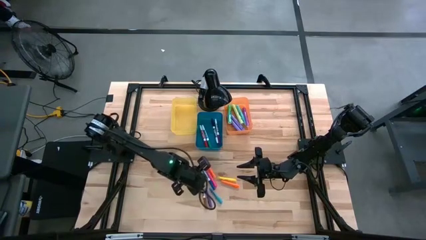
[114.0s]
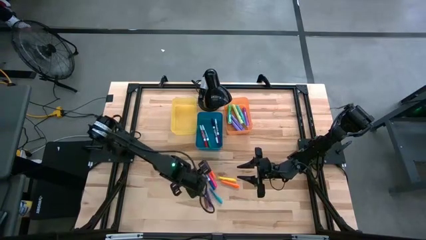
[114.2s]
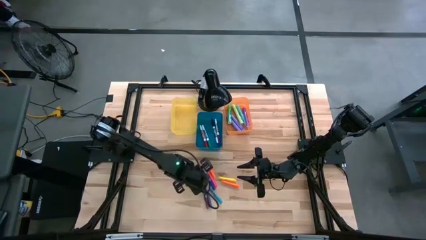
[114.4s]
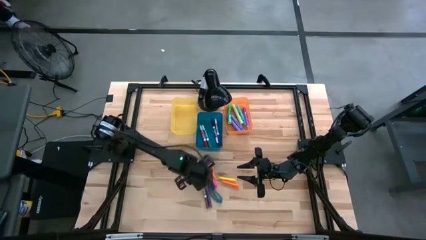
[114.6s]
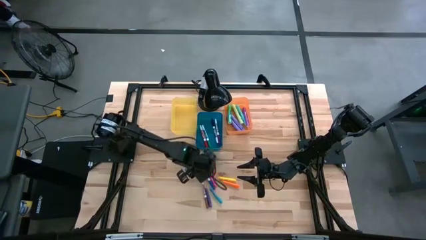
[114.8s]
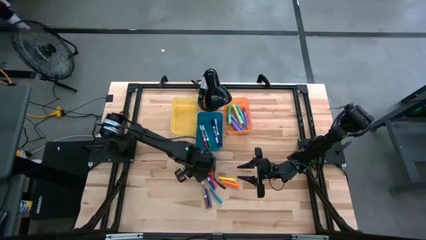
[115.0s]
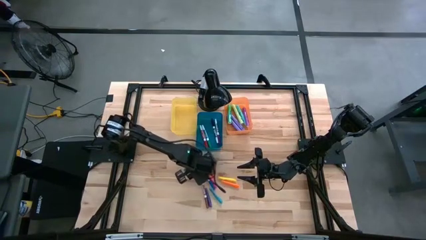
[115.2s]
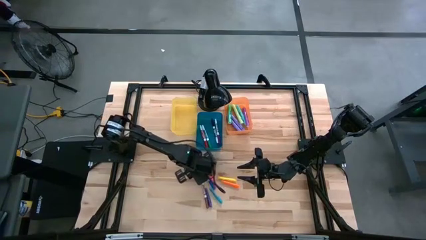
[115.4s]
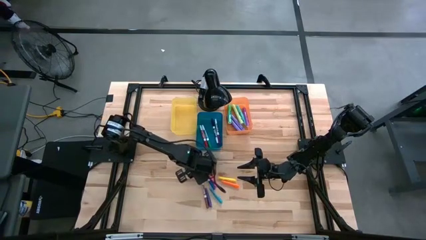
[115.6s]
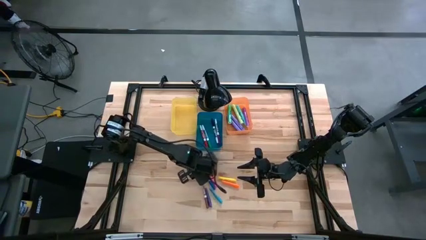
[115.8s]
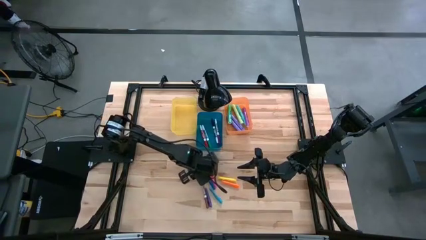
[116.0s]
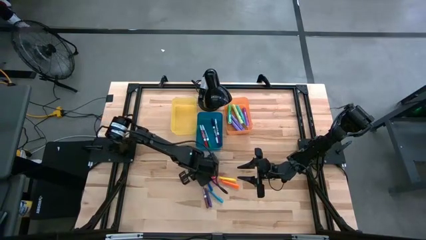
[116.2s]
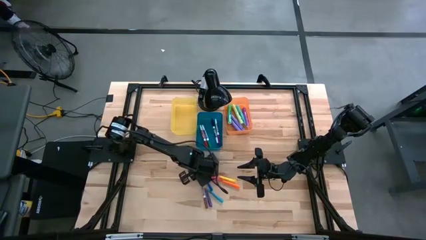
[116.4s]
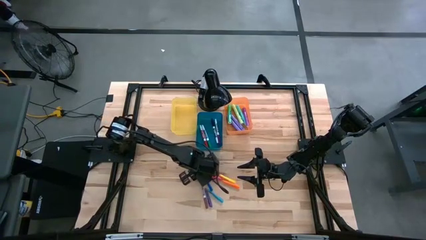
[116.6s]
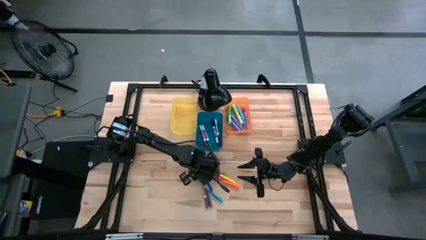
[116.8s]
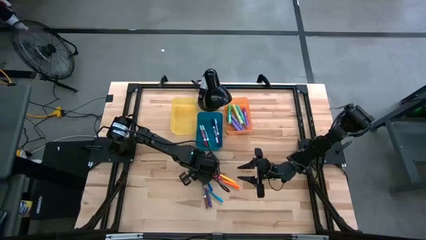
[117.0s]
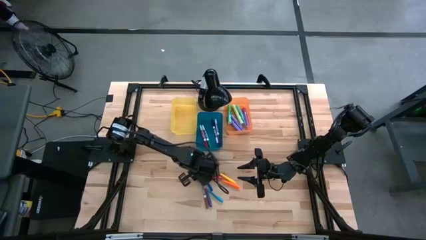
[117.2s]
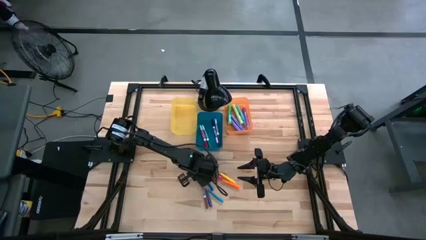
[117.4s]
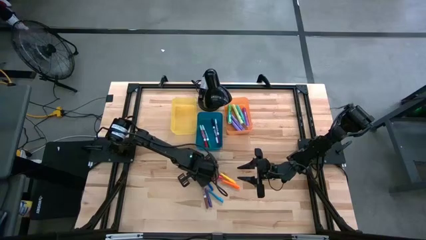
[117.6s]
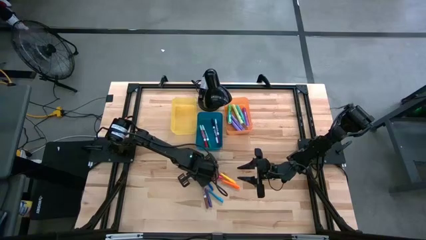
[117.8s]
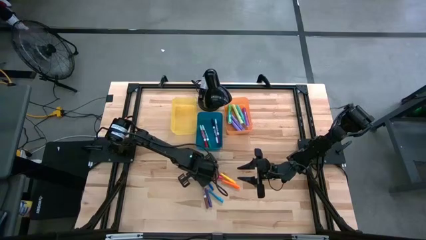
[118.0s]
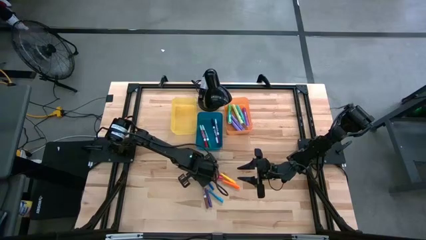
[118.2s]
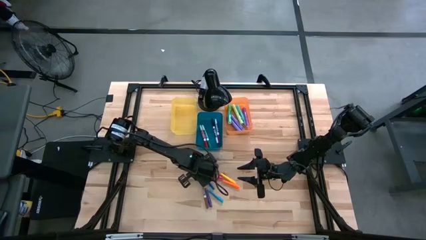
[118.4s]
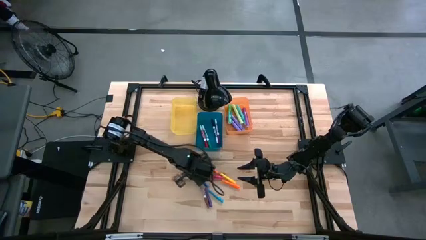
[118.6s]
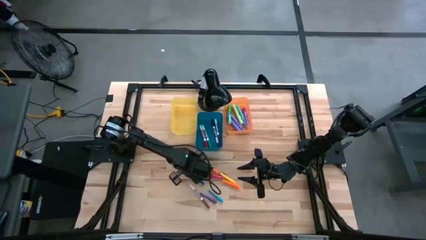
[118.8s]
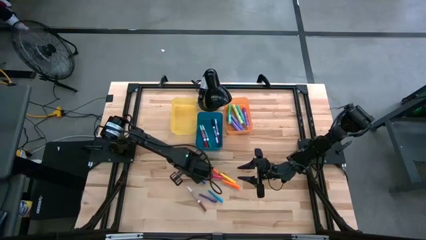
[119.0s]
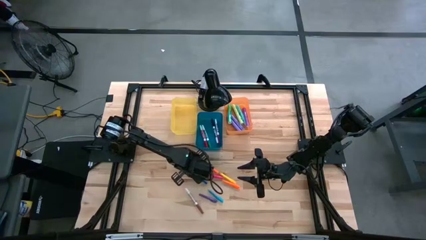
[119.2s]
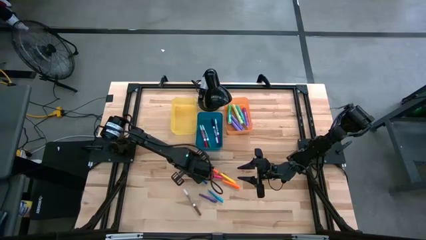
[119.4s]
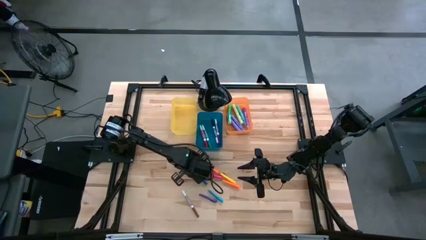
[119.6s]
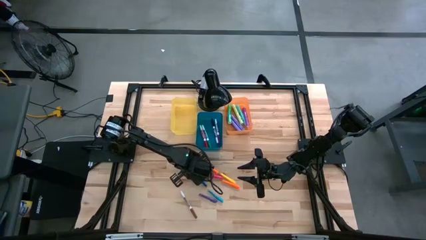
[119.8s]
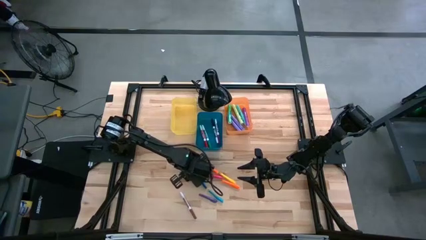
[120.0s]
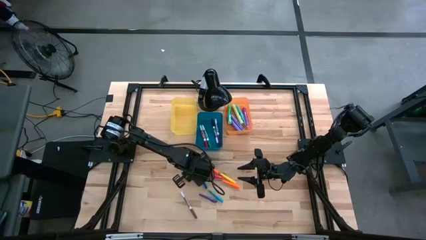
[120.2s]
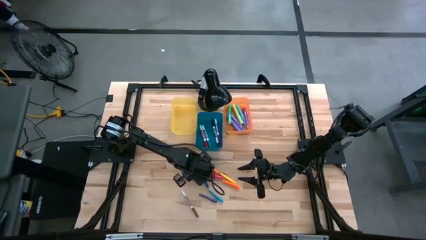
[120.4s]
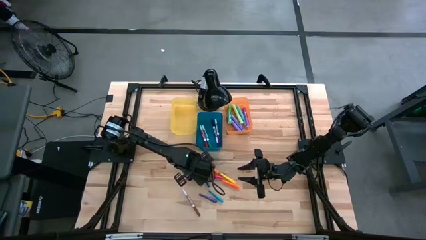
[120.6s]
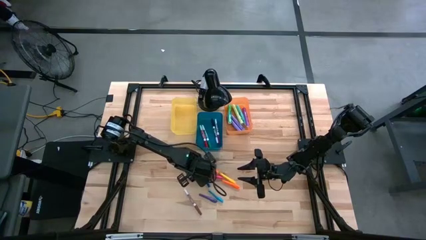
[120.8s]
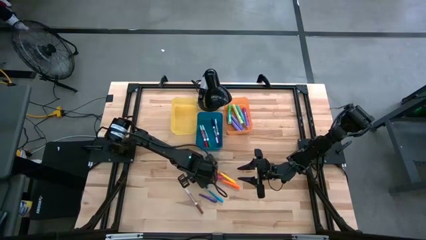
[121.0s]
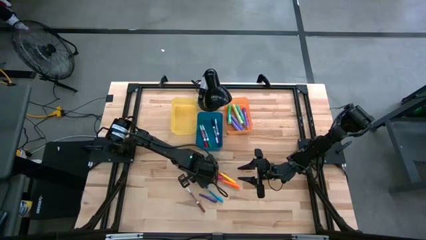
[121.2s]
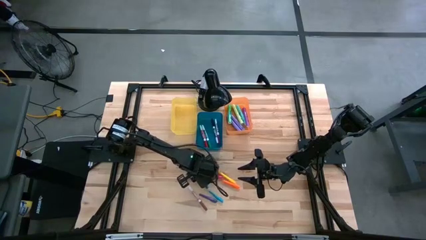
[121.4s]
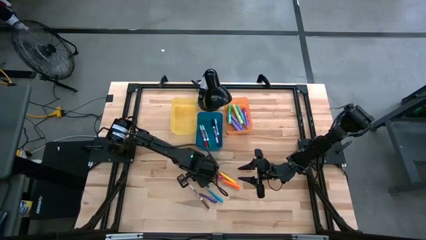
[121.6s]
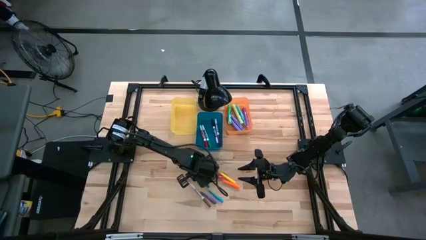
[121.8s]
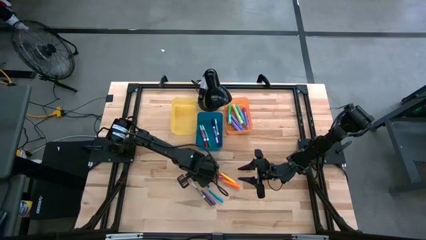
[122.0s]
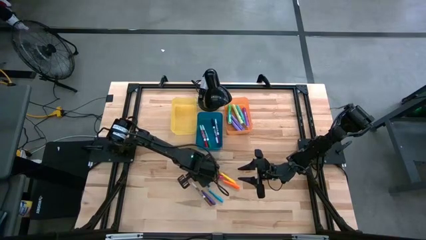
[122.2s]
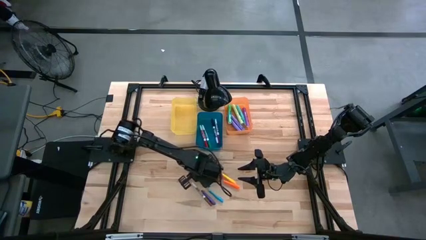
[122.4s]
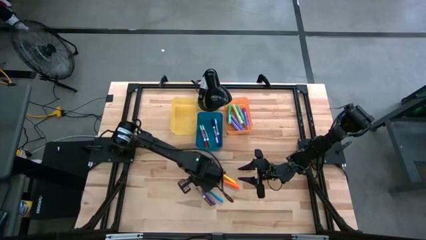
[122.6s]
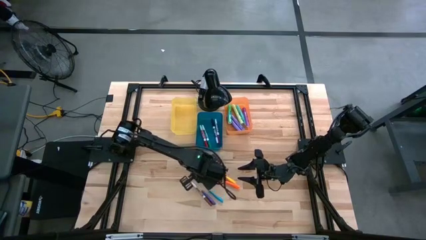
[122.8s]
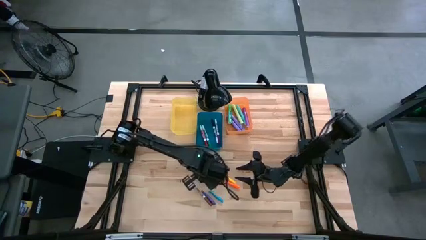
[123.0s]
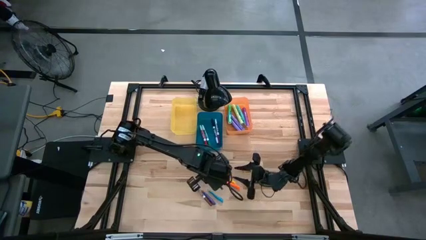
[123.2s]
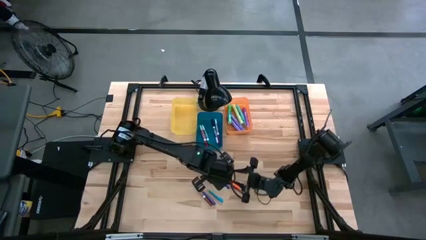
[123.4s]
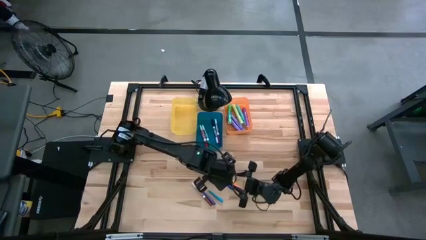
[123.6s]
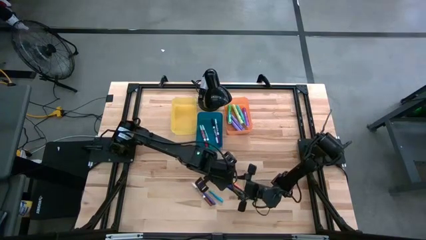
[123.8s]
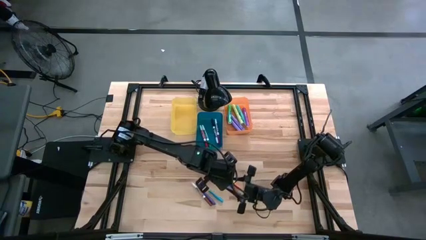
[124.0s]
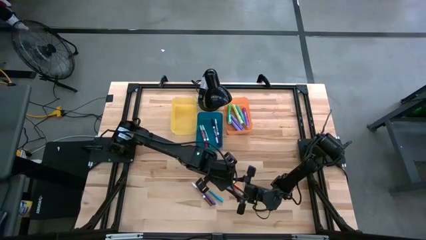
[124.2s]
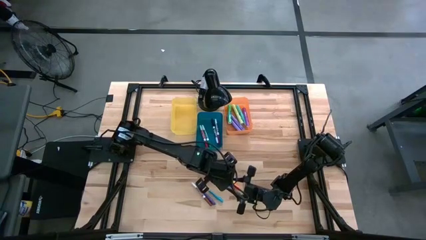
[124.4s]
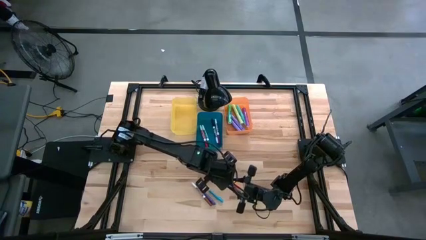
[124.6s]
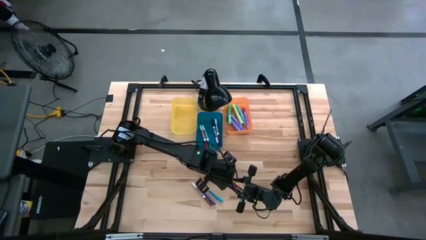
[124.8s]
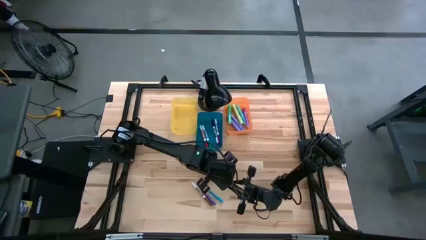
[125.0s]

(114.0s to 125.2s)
Task: Pick & Place Markers
Put the blue dry erase marker into the blue bin

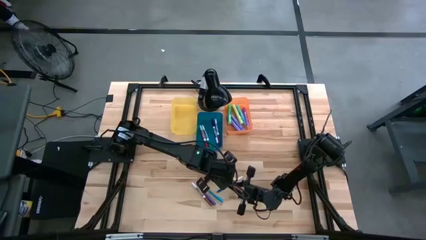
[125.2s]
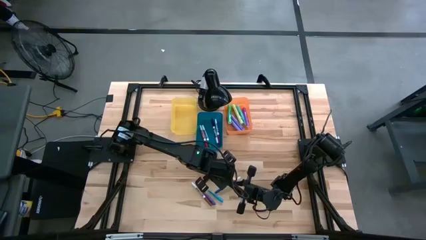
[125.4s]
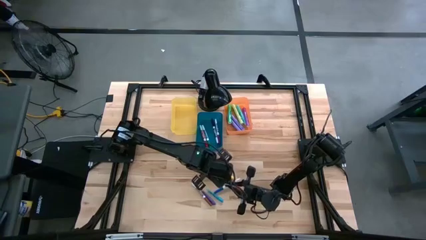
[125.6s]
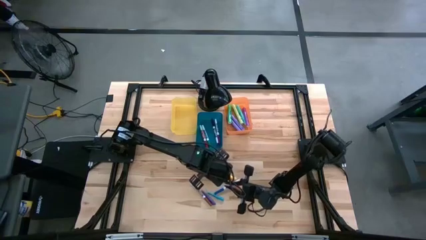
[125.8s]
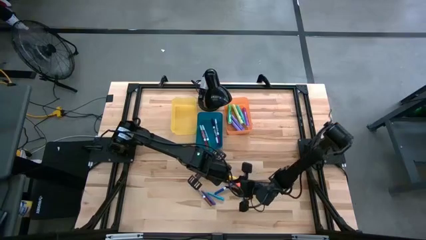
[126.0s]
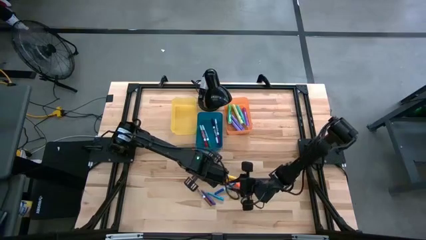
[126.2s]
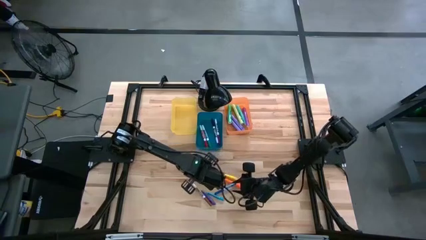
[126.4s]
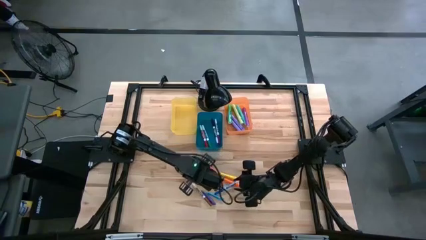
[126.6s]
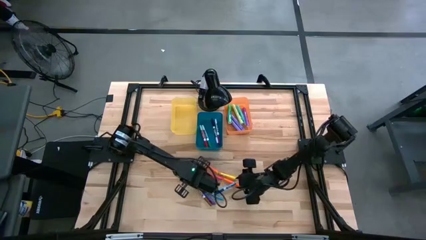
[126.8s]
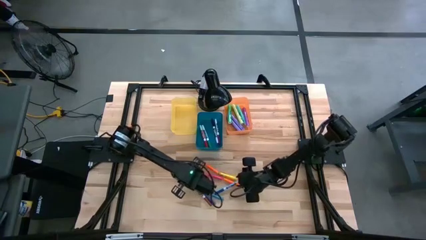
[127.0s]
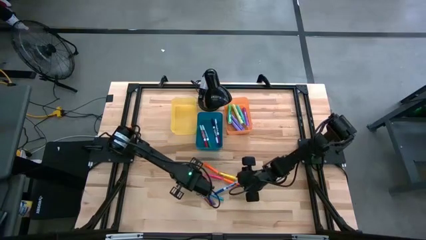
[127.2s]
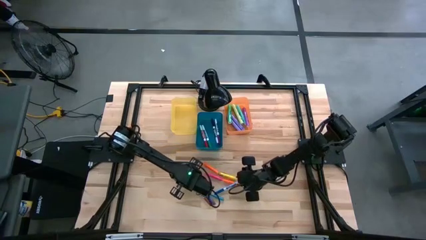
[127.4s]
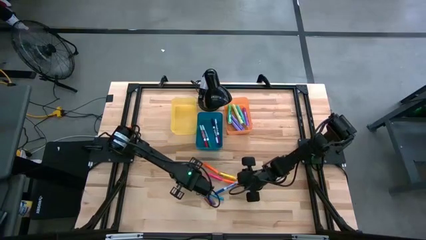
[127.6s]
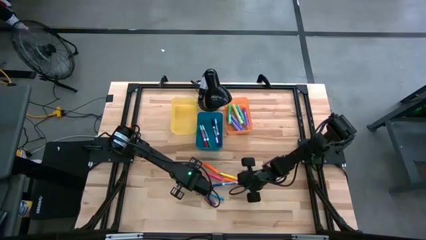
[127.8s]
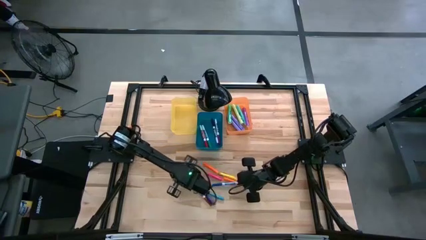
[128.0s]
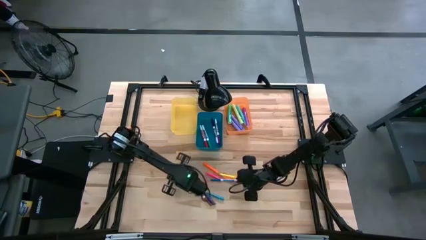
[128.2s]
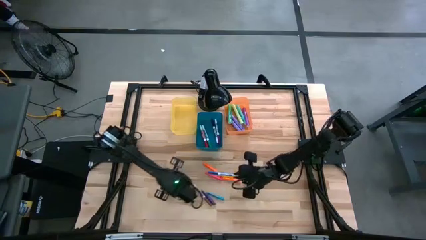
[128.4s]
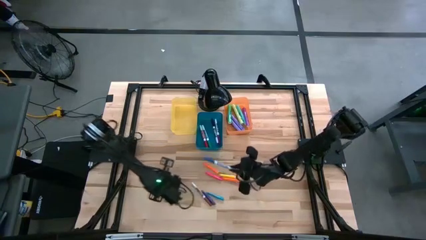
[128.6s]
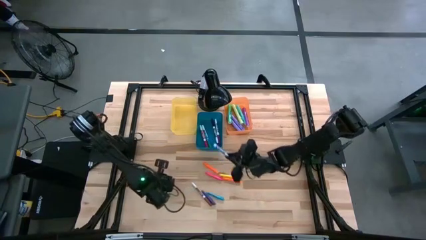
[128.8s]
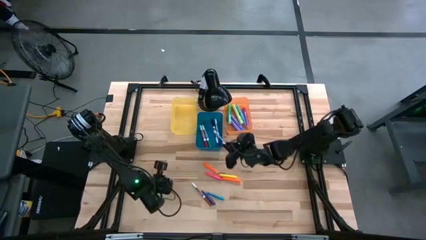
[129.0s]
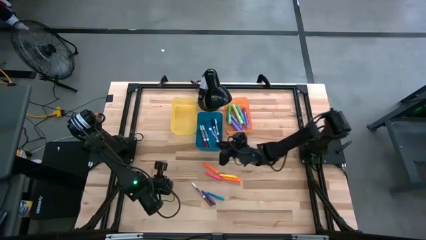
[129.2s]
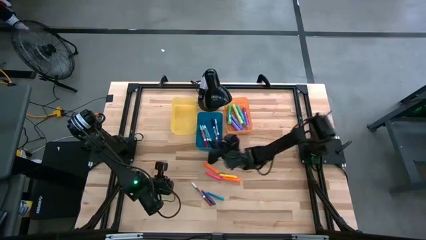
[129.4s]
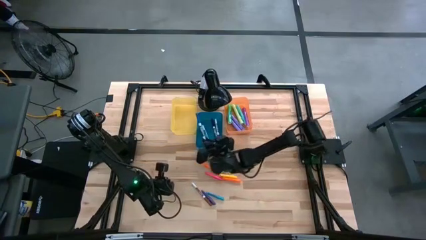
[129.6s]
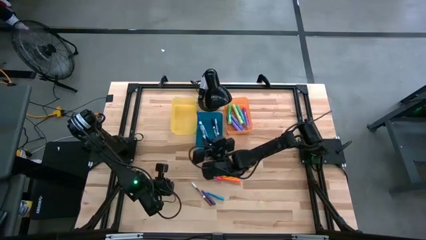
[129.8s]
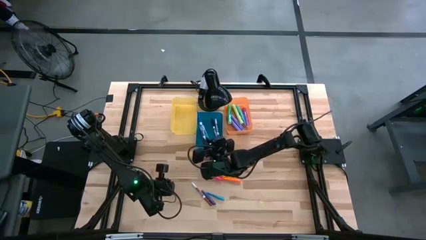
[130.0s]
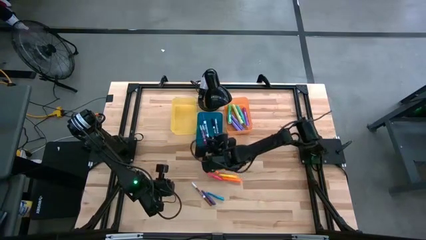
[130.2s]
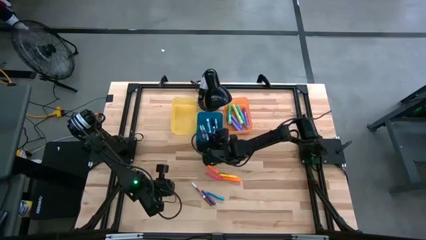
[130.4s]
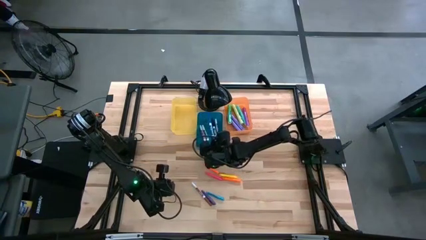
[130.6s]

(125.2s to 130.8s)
Put the blue dry erase marker into the blue bin
